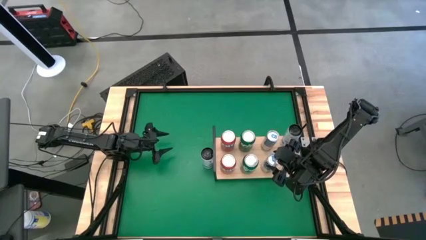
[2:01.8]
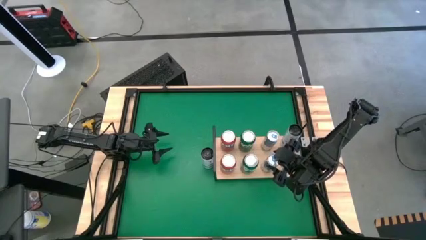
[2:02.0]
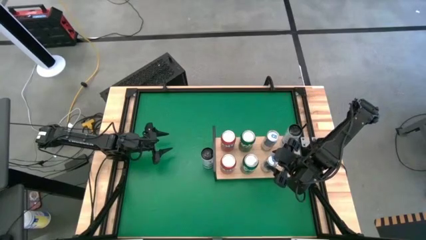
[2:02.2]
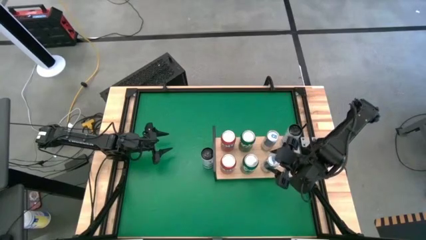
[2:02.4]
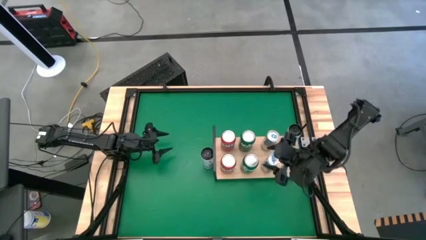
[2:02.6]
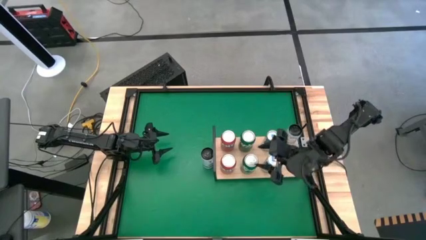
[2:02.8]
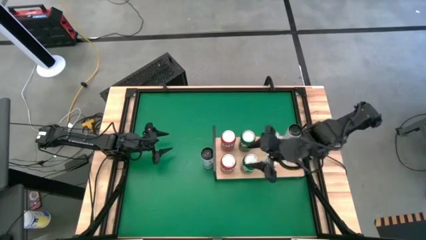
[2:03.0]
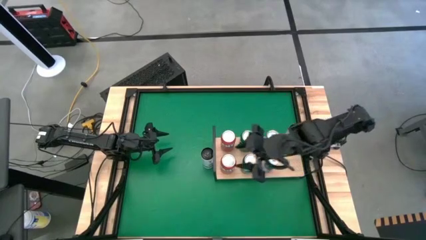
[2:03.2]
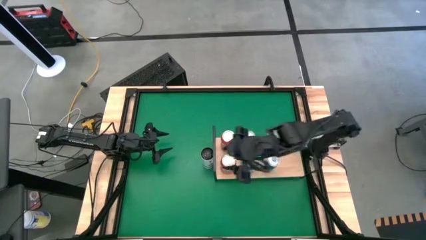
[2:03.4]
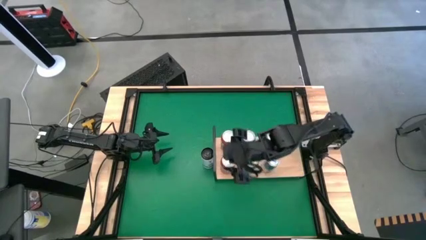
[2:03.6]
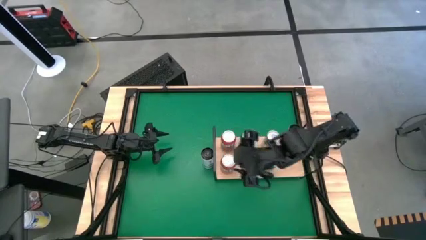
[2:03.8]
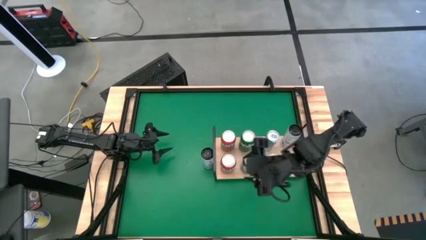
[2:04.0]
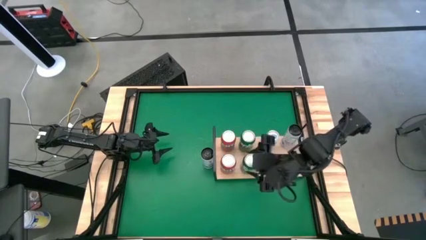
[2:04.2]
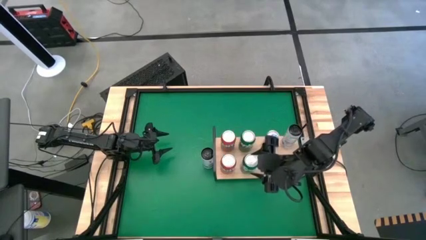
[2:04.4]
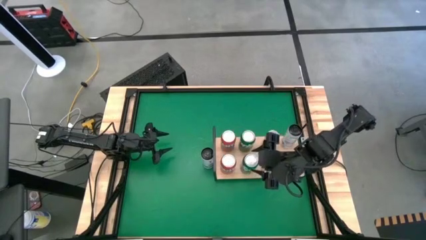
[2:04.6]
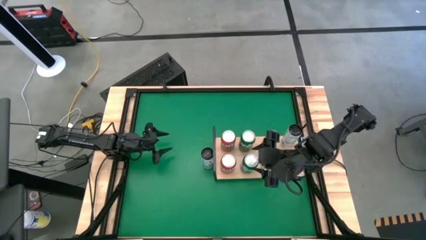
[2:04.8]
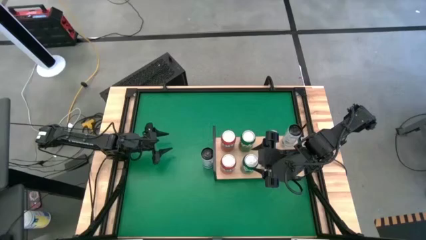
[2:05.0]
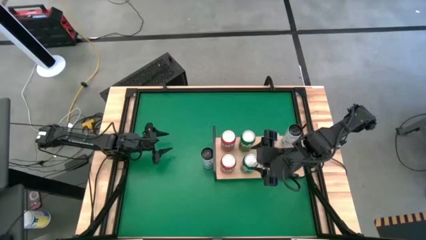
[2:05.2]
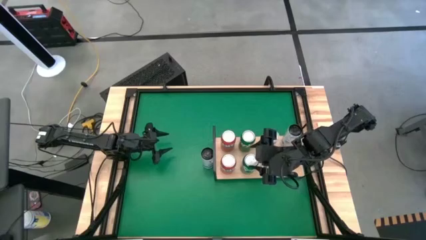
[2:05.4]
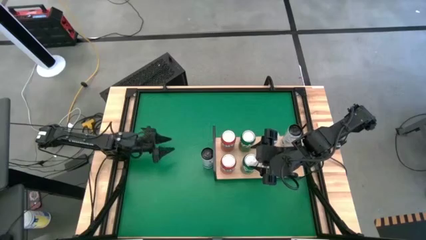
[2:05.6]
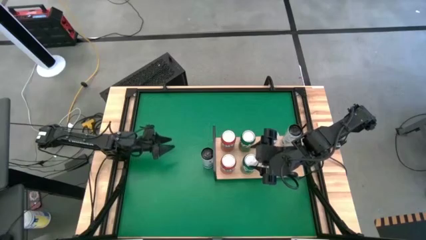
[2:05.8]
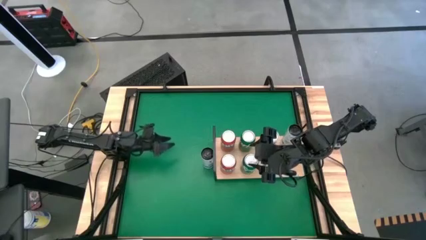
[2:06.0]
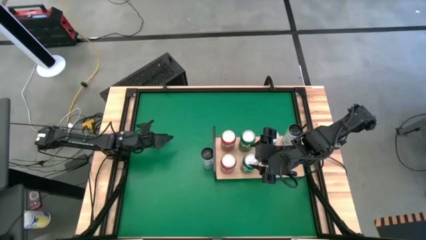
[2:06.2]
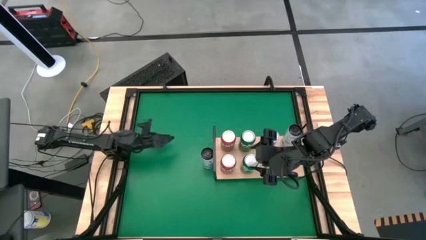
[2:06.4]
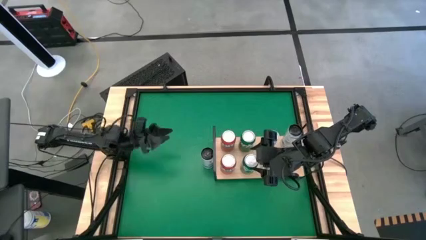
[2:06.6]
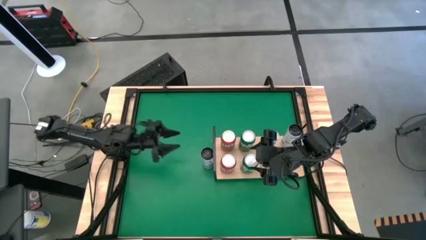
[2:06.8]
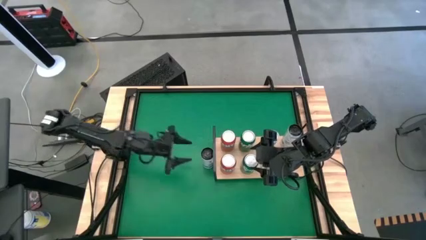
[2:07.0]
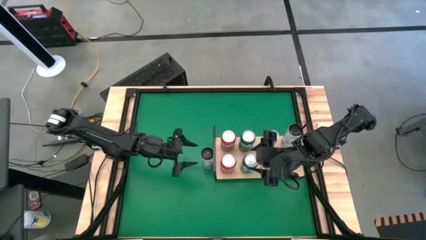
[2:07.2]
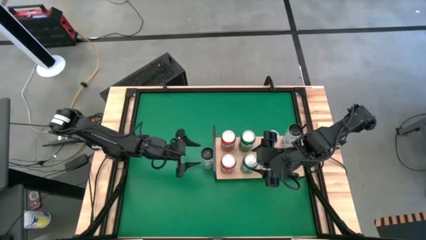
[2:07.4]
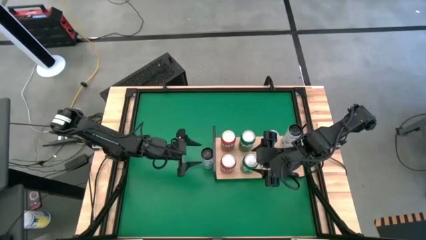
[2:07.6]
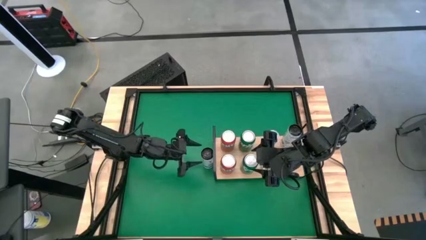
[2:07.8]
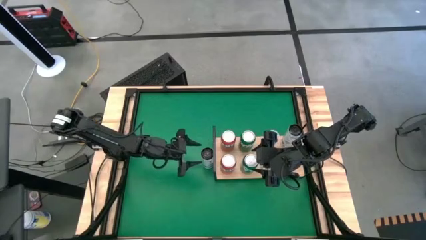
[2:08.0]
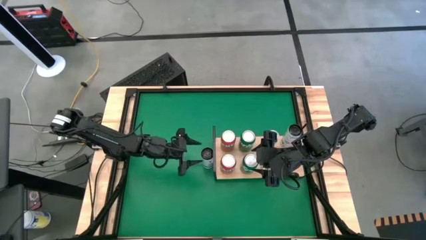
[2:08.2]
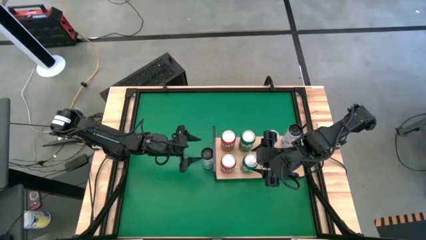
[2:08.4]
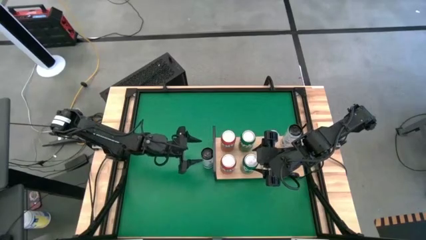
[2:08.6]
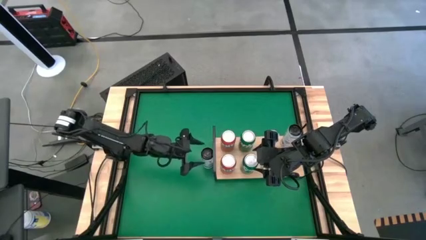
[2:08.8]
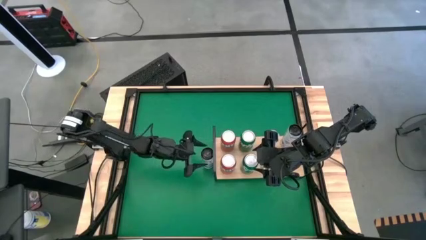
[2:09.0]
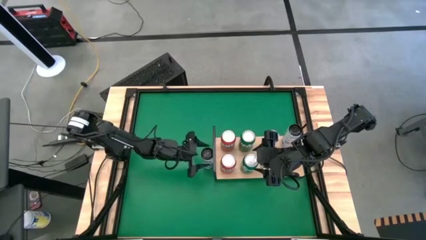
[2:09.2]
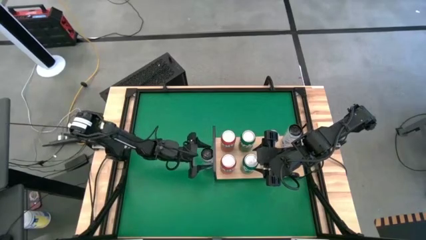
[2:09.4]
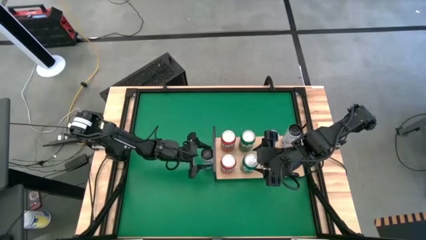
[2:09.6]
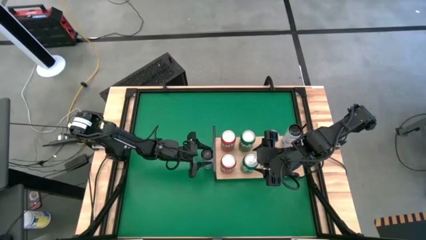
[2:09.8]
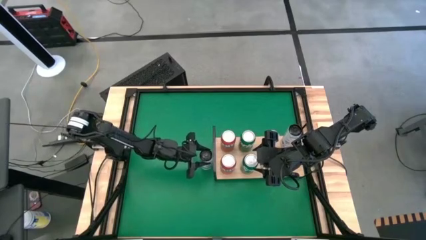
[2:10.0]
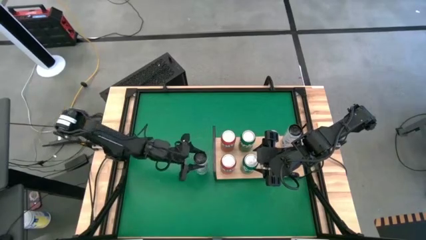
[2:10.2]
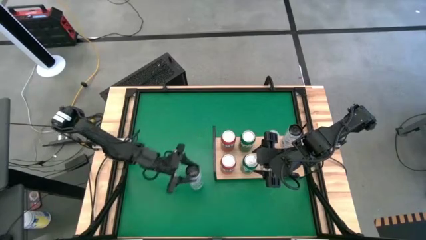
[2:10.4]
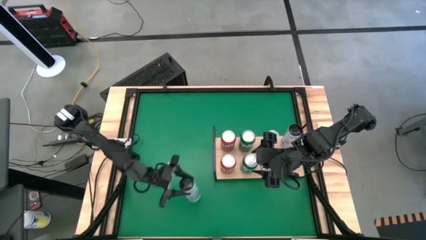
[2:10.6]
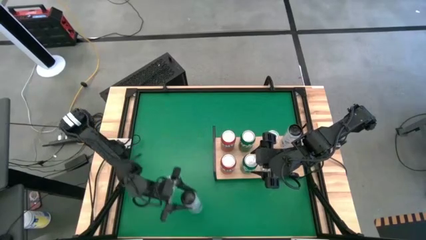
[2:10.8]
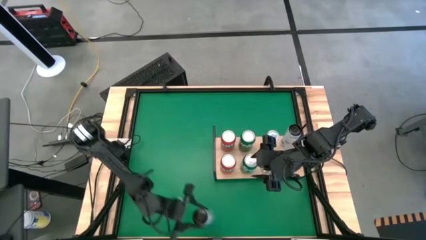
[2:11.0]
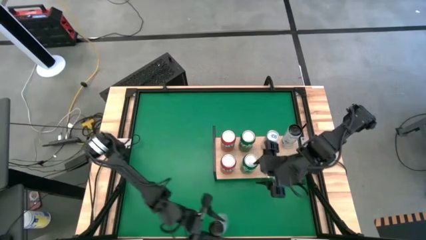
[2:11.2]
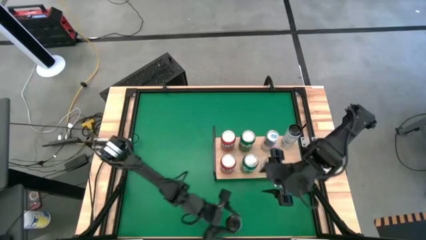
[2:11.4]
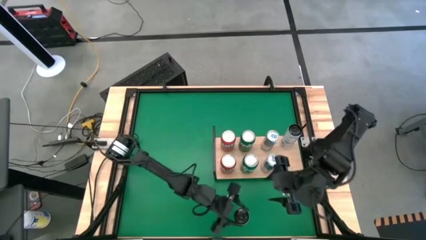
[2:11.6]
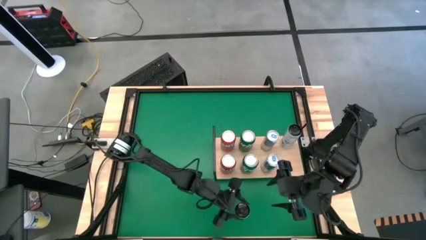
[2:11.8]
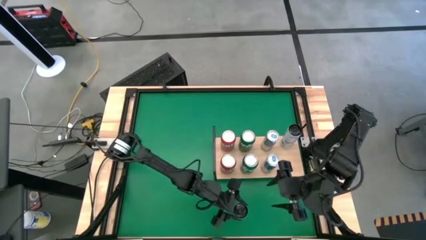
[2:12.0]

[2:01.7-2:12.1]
Task: Place canned beverage on shelf
Put the white soda can on the shelf

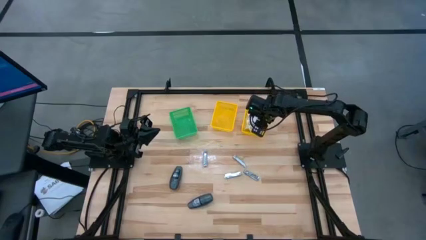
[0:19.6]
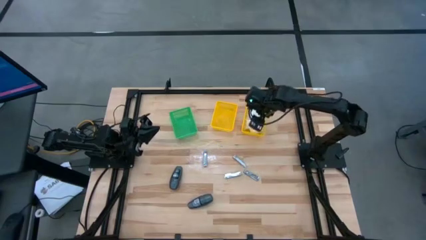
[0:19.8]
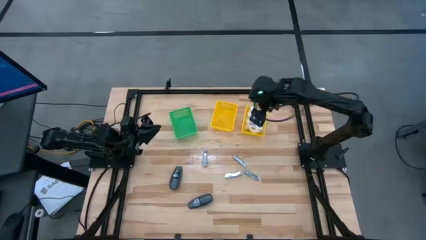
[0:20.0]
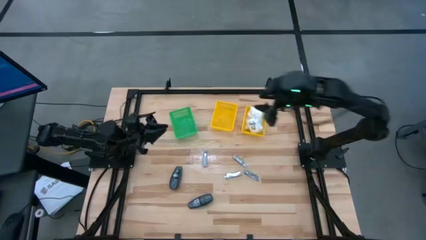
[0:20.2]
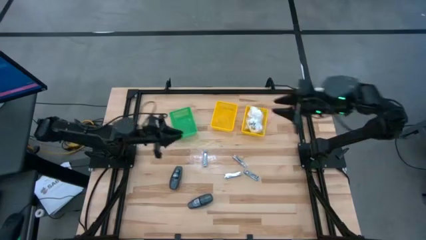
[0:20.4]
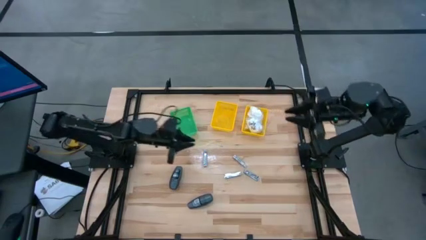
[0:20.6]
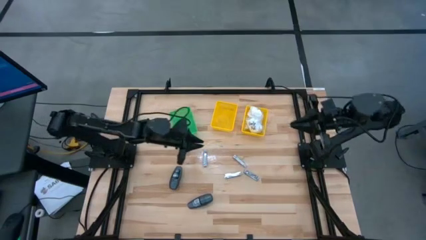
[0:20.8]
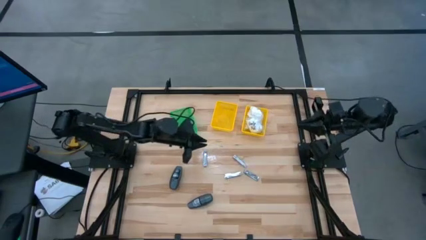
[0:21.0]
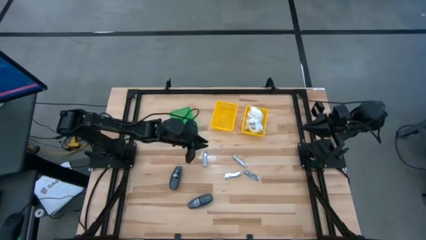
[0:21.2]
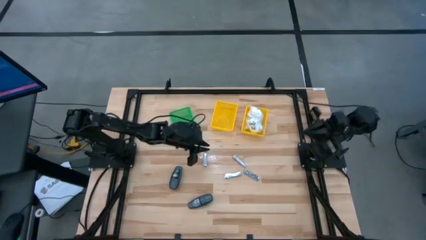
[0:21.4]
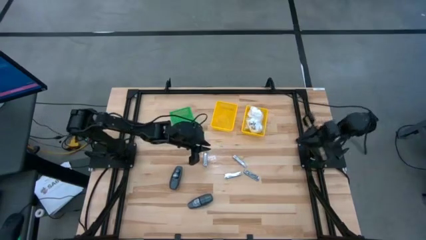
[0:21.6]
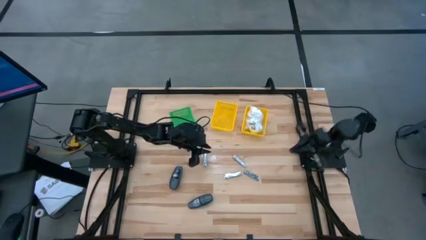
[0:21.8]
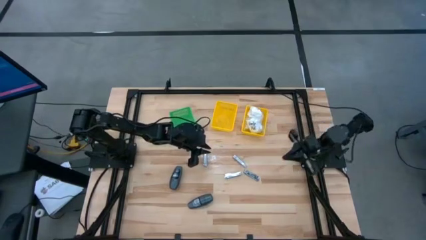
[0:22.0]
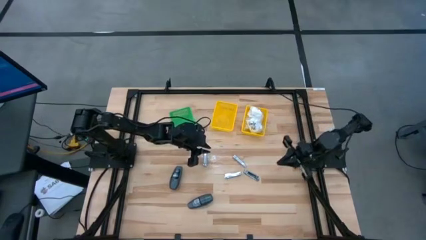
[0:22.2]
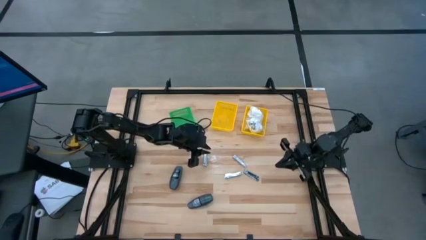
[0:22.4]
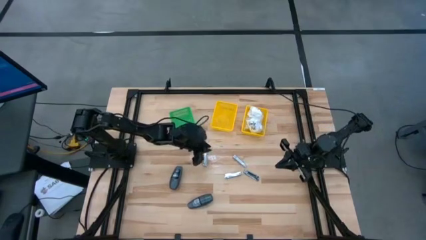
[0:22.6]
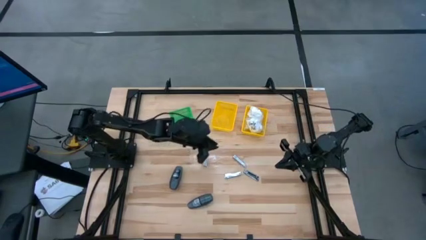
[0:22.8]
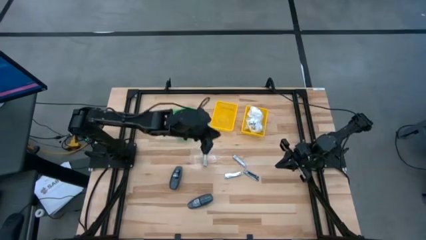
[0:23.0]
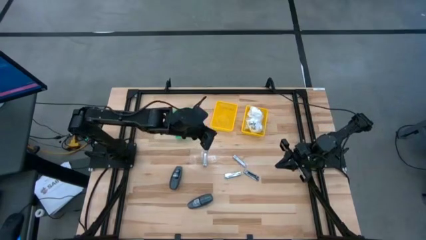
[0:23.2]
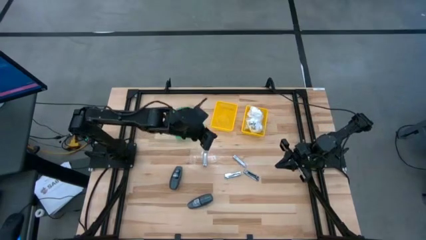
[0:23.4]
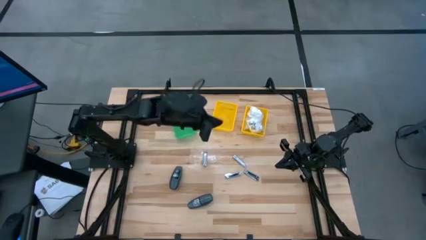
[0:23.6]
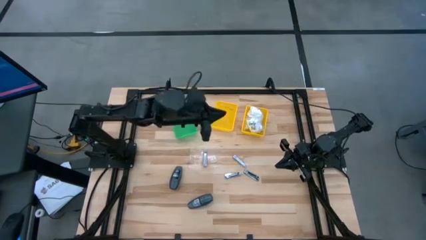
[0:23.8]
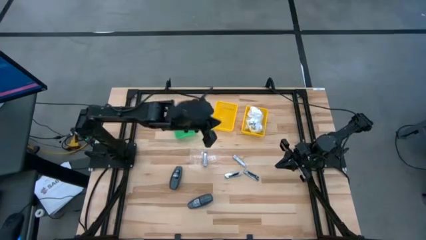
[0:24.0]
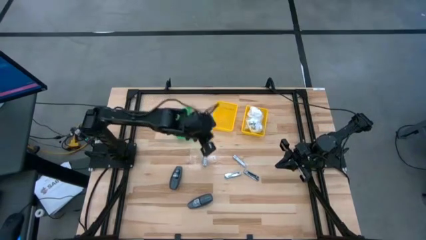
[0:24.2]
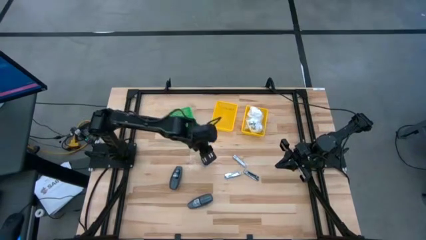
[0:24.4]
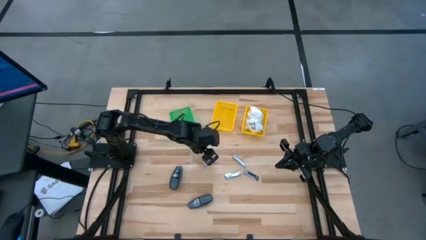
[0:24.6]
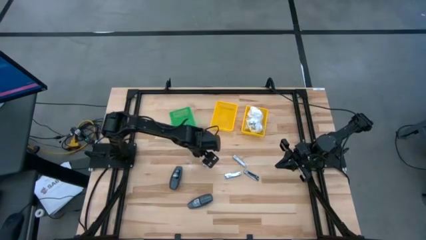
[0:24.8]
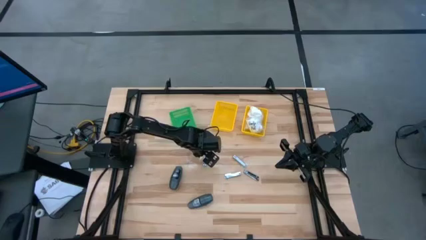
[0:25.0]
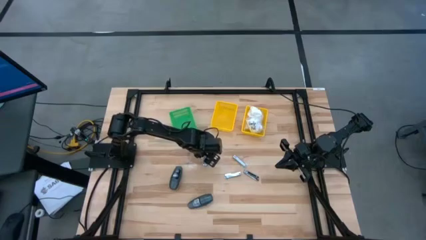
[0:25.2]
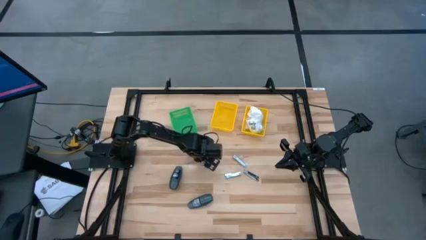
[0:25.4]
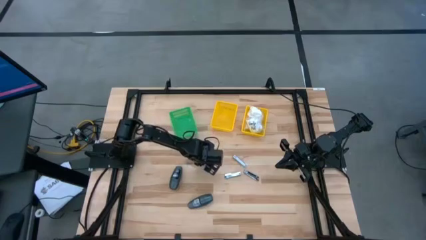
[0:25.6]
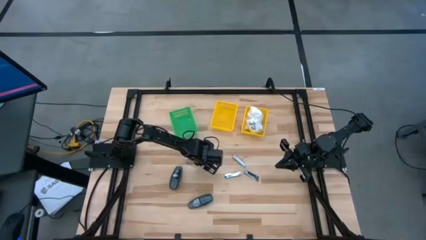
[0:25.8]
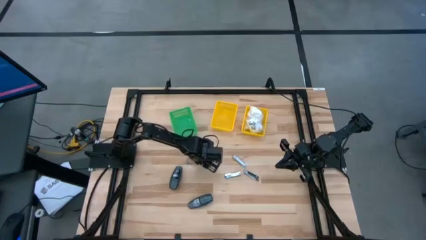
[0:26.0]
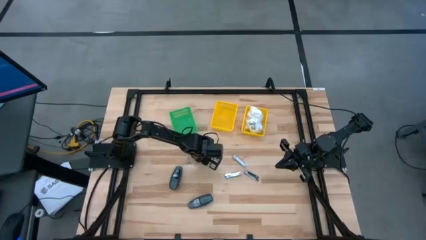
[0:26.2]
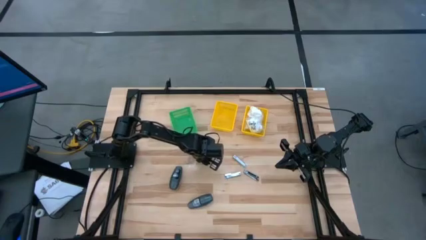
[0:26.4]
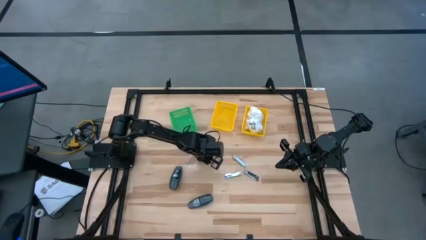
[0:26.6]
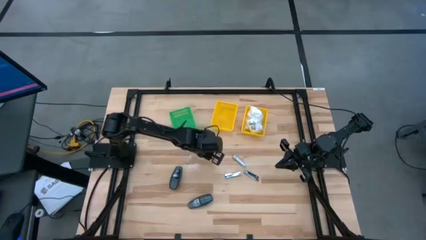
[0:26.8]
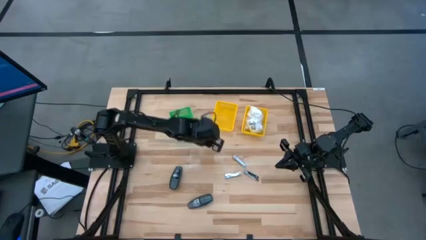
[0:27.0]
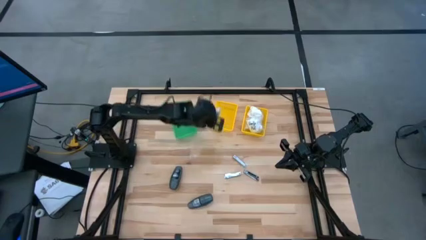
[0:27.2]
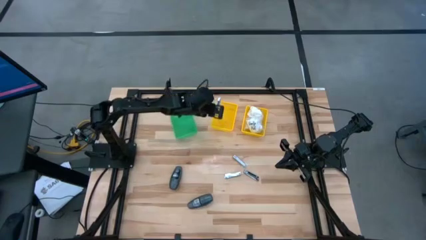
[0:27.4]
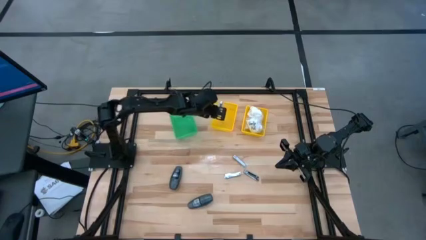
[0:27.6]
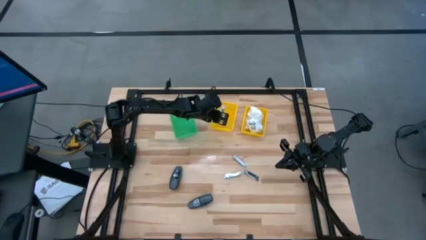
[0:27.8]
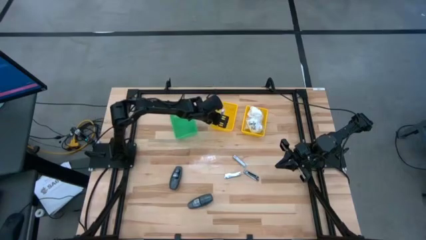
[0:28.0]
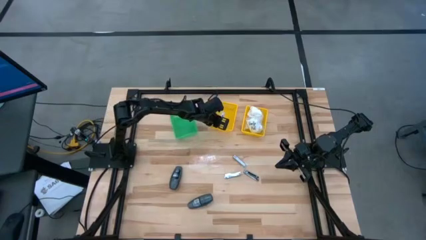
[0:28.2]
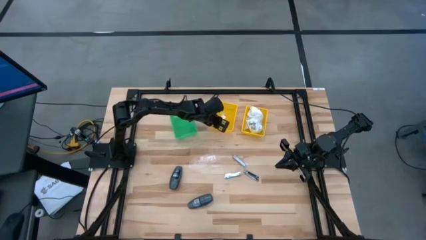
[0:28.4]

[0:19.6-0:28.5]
Task: Pick & Place Travel size toiletries
Put the silver nail cutter into the left yellow bin
